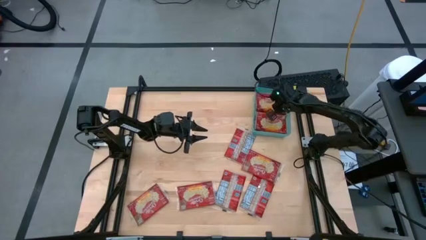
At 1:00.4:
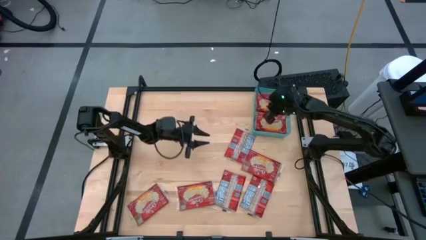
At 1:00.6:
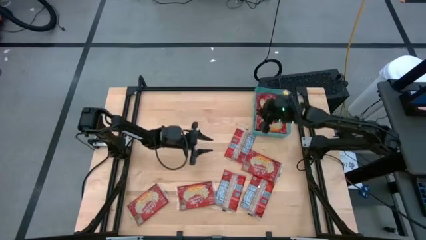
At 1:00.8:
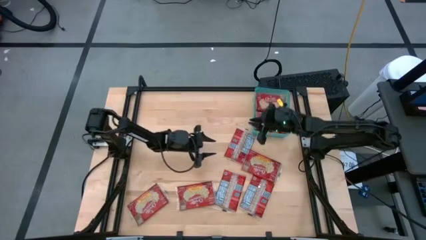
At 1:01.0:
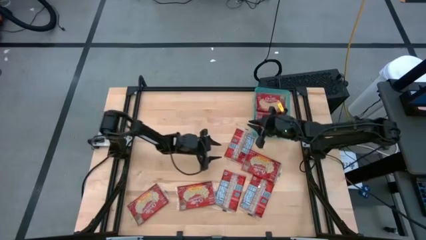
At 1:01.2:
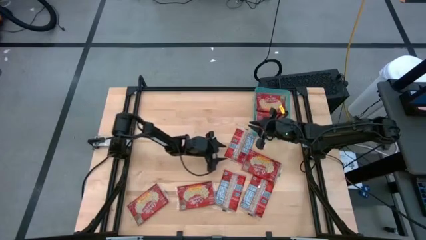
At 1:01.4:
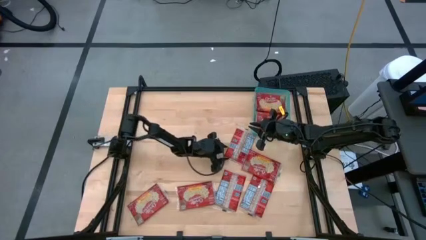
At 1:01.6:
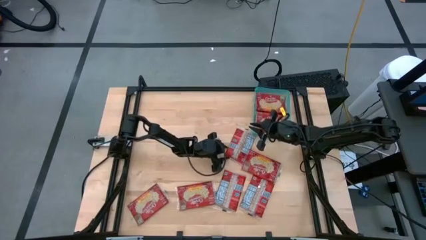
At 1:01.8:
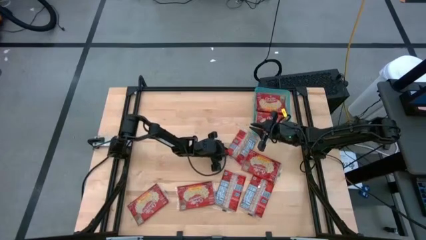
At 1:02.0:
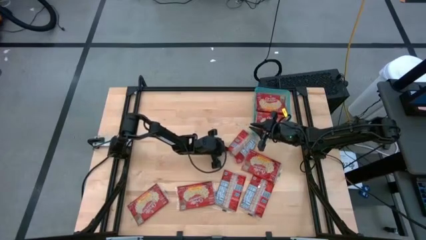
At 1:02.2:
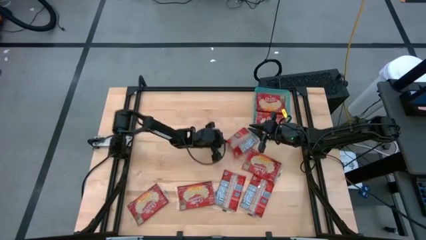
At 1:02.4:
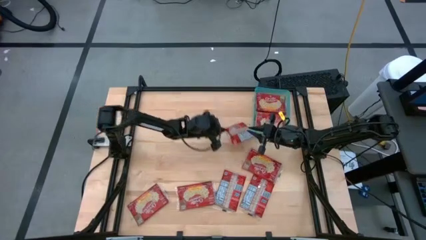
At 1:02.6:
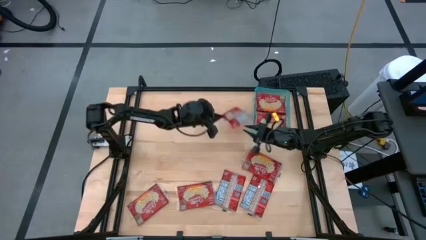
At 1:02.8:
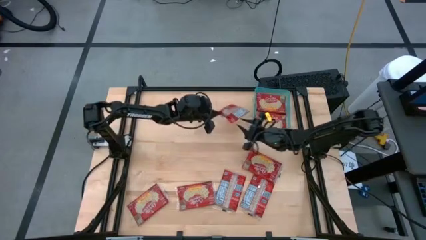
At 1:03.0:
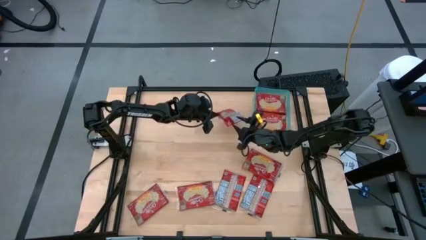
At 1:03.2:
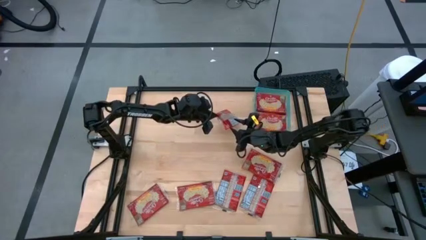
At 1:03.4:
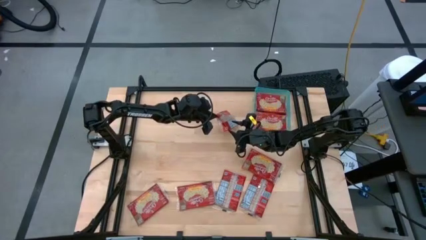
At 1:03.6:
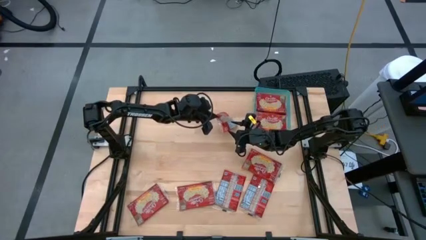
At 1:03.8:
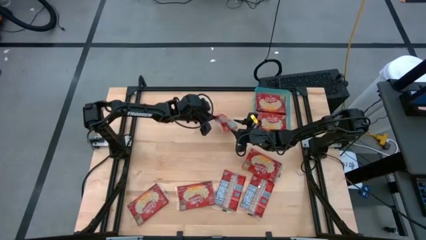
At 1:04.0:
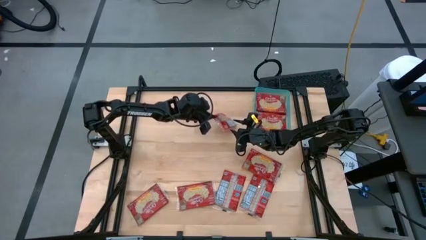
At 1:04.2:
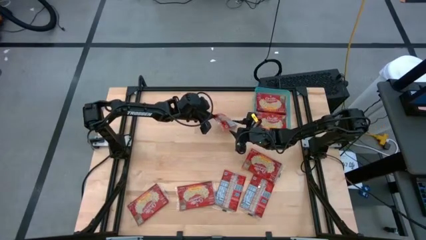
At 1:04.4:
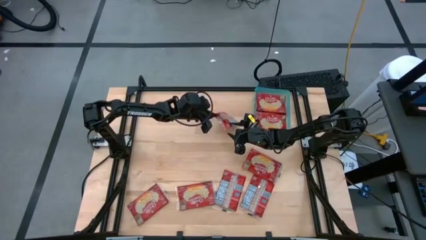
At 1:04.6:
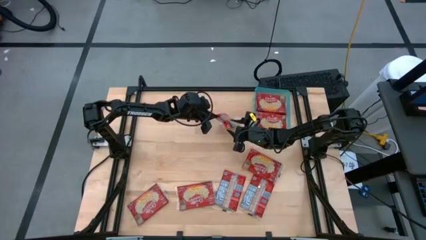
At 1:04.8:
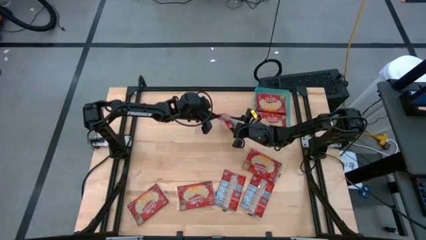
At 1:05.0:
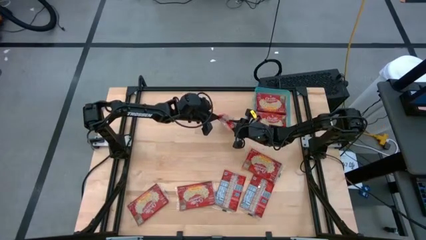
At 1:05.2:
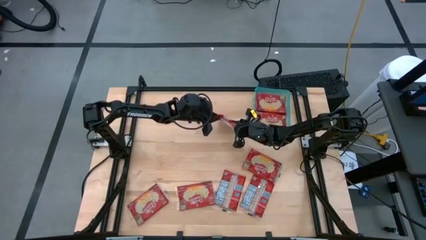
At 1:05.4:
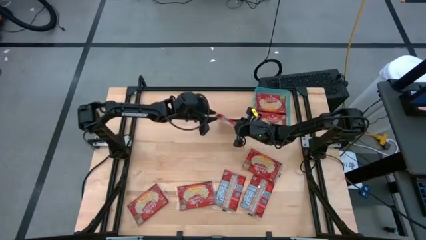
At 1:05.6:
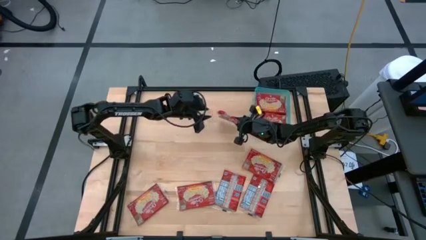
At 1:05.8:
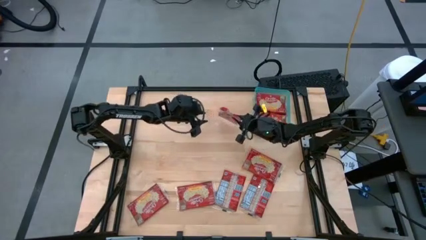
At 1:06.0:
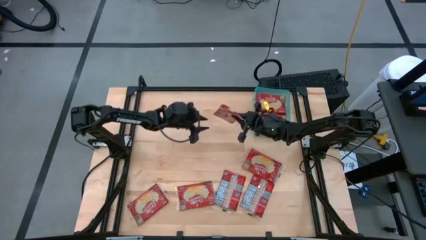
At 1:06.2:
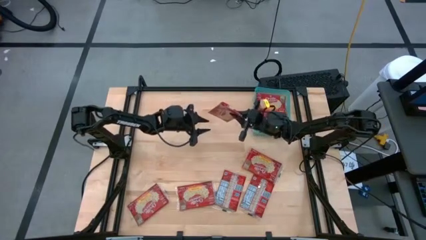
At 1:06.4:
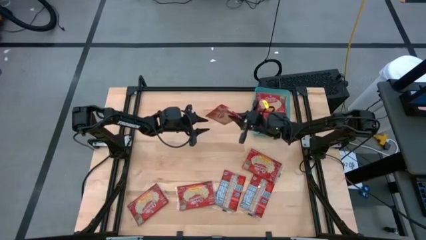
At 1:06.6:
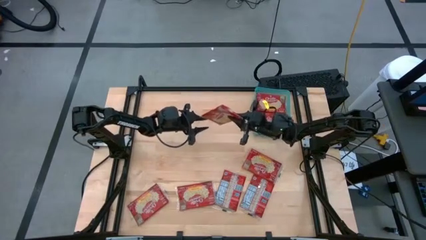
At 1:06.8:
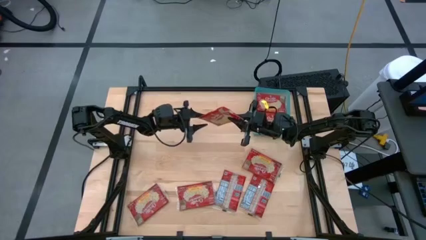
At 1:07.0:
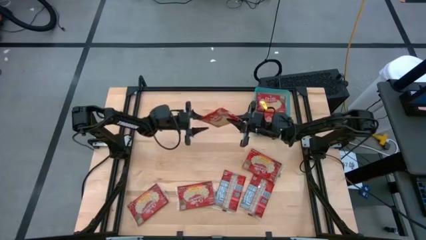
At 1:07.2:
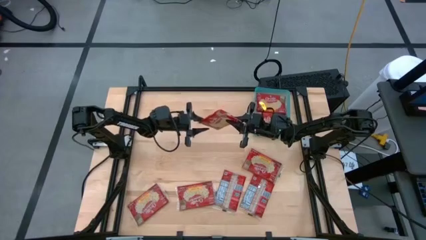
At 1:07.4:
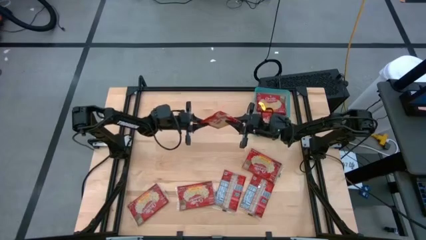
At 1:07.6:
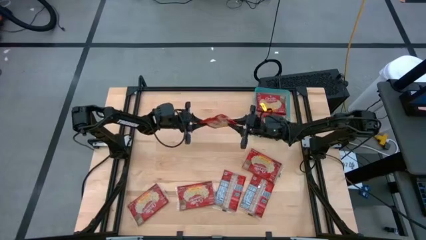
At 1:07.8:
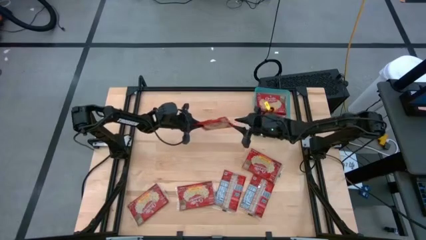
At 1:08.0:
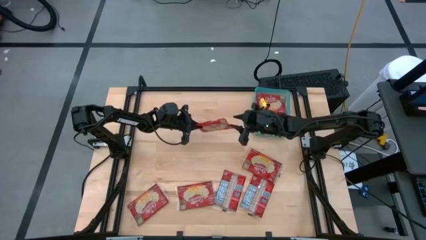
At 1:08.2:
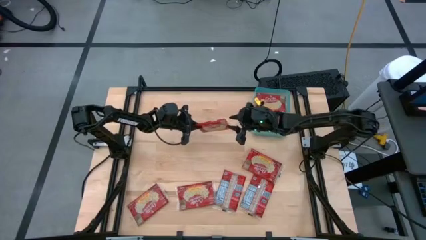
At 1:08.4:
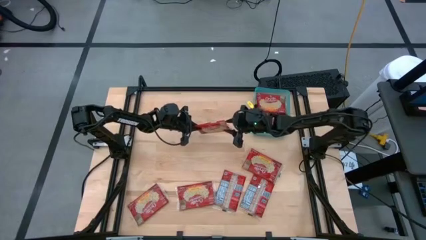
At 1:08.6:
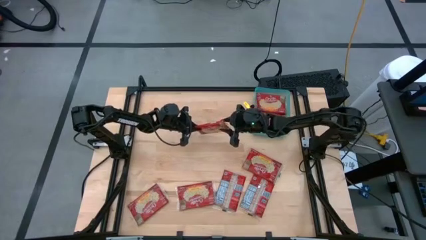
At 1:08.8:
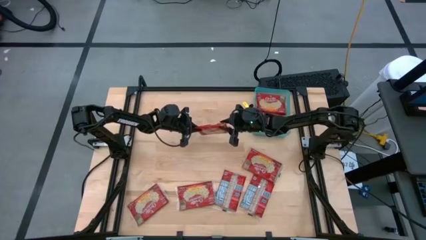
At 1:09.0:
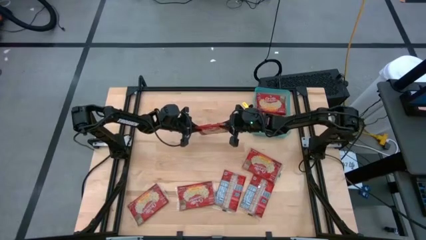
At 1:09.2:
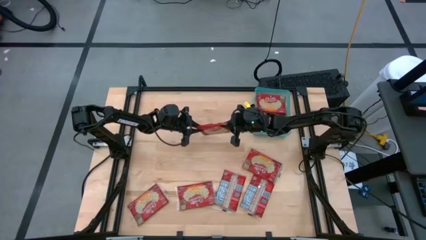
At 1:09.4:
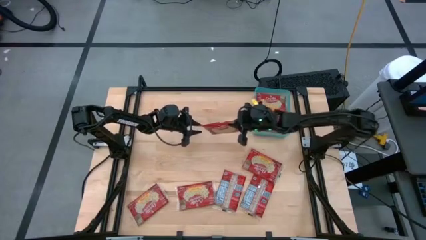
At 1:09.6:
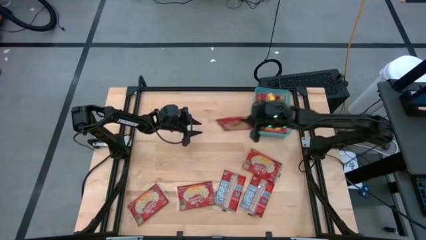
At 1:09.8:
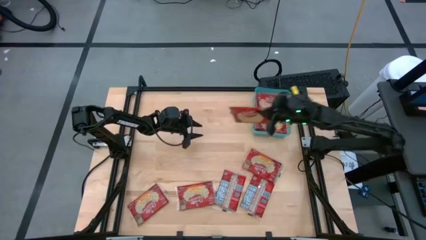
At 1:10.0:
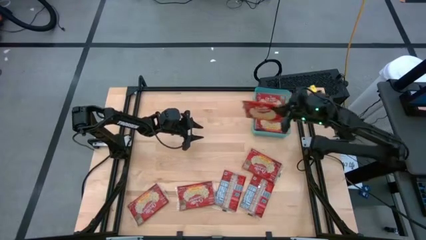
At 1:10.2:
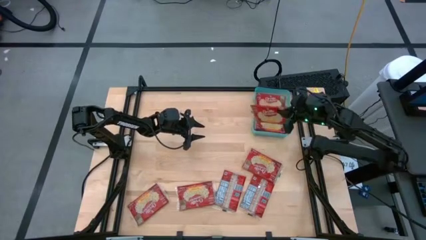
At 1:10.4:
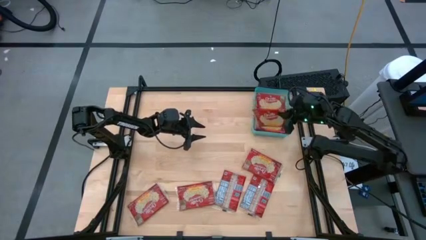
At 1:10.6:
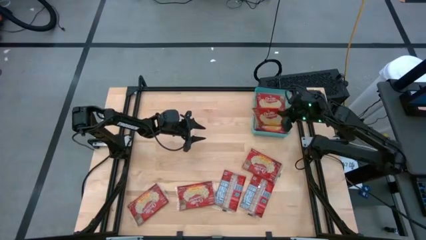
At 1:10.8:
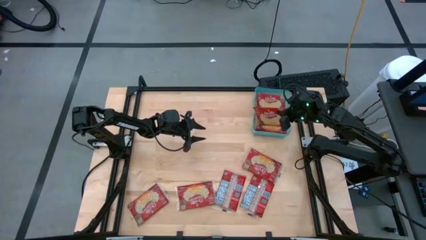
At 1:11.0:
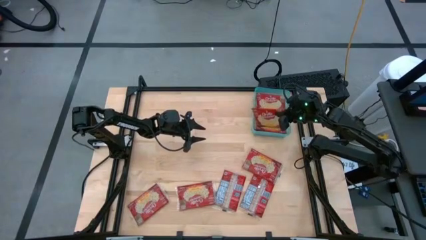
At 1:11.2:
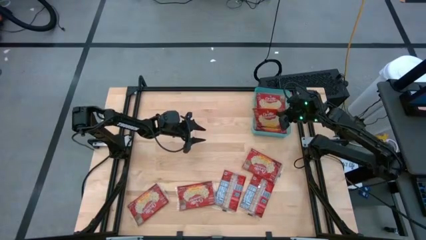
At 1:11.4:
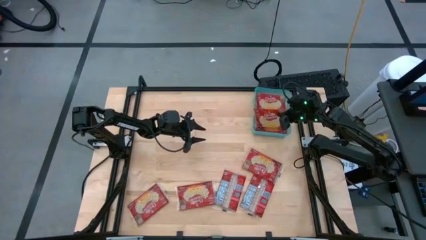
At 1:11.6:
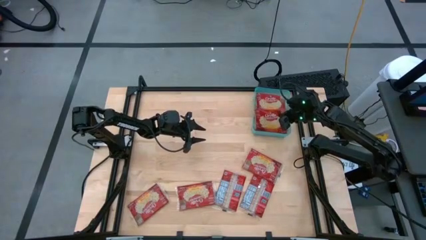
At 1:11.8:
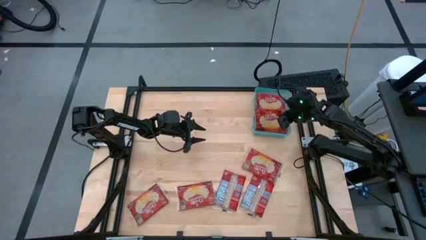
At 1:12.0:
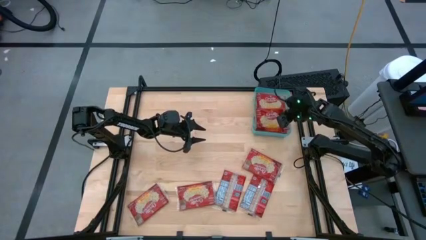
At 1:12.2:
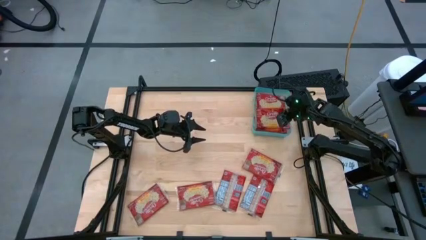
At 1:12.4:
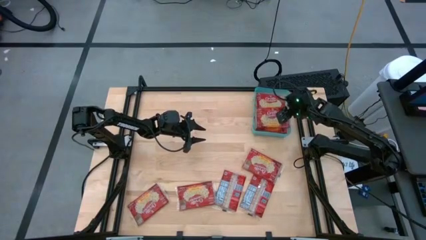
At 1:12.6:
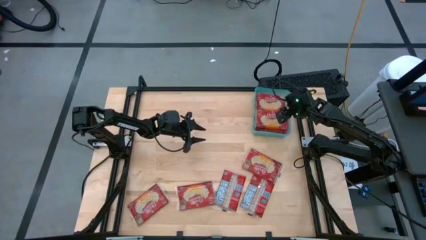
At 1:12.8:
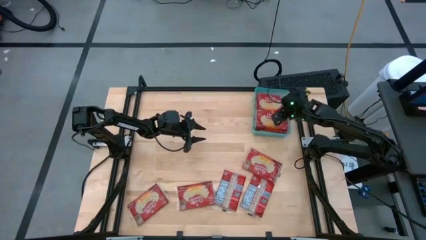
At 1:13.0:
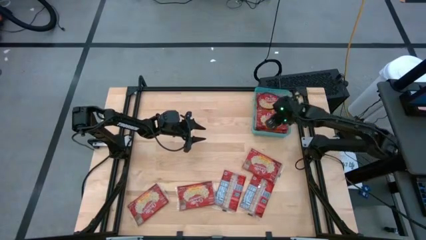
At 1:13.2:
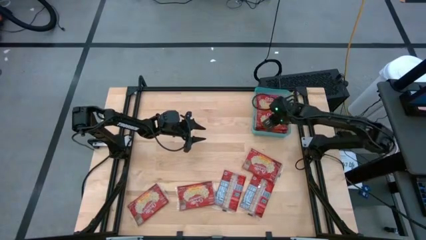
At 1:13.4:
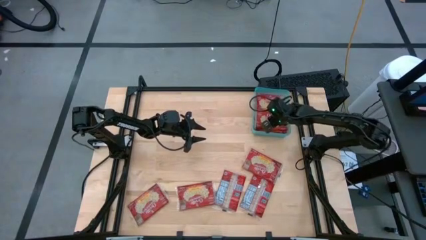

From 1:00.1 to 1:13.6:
Task: Sort popcorn bags into baskets
Put the red popcorn bag into the green bin

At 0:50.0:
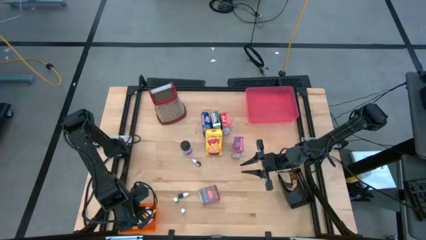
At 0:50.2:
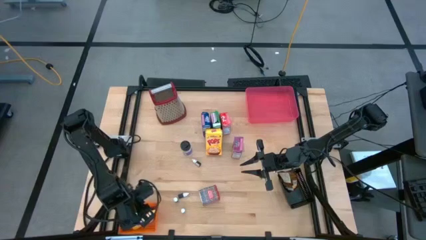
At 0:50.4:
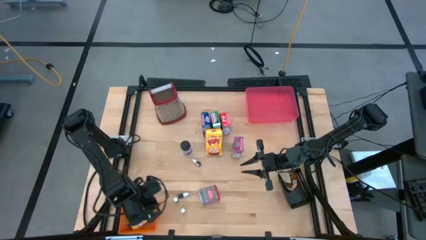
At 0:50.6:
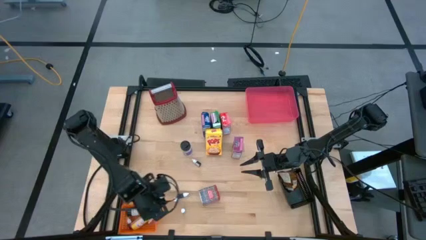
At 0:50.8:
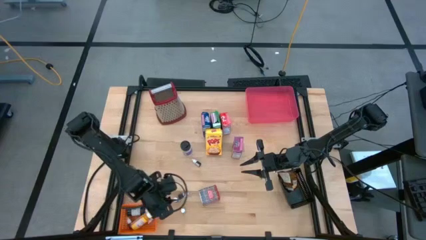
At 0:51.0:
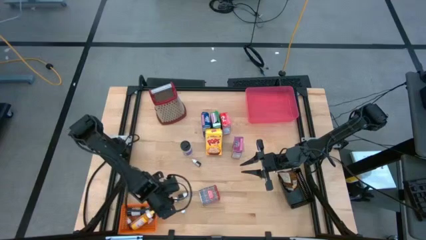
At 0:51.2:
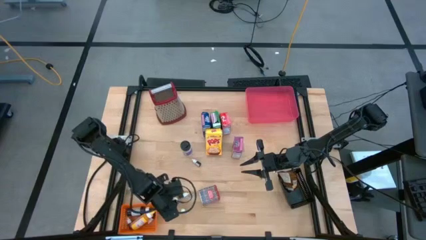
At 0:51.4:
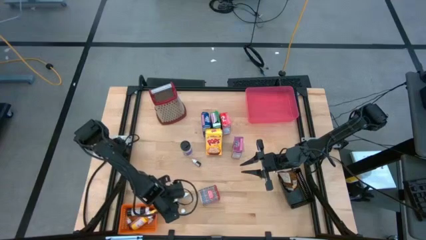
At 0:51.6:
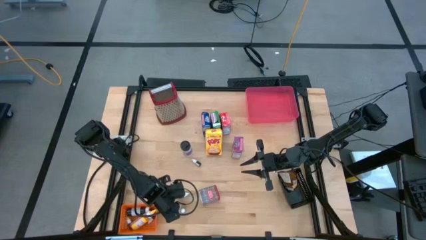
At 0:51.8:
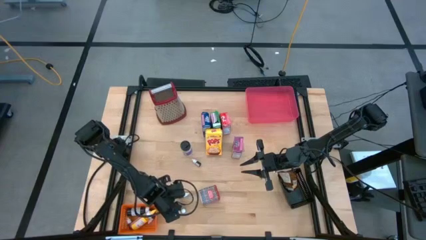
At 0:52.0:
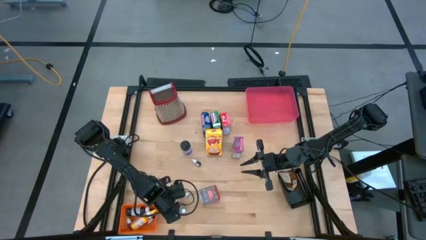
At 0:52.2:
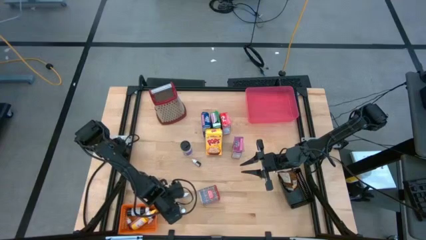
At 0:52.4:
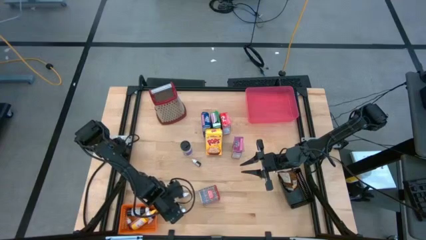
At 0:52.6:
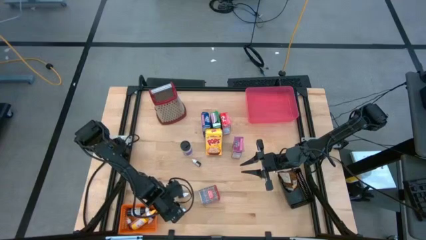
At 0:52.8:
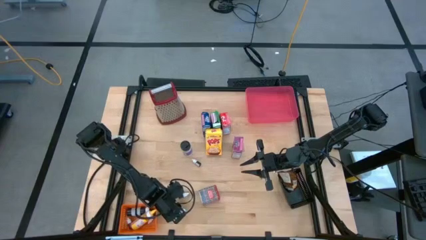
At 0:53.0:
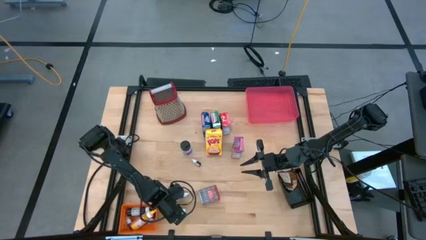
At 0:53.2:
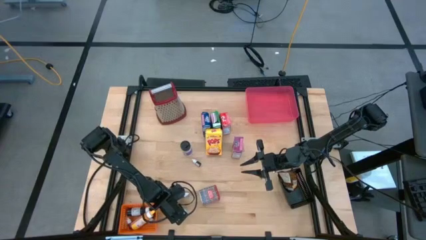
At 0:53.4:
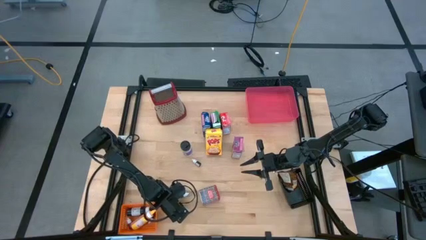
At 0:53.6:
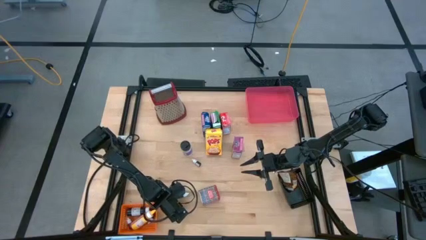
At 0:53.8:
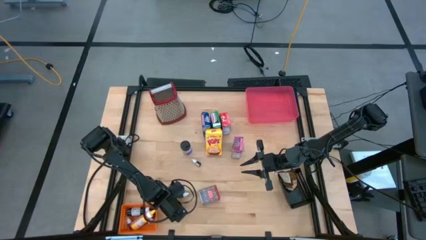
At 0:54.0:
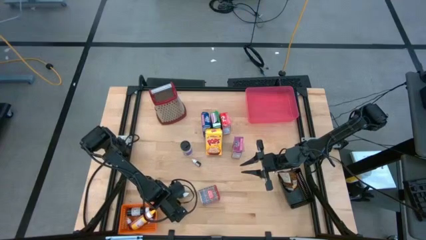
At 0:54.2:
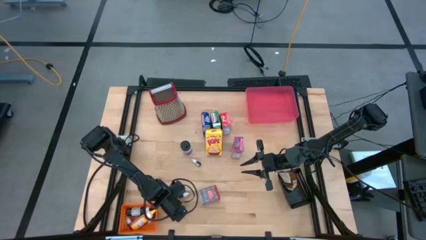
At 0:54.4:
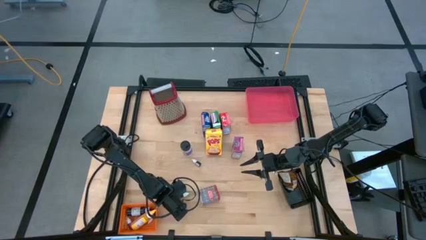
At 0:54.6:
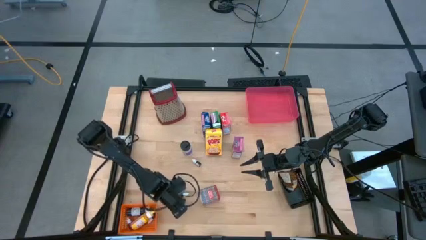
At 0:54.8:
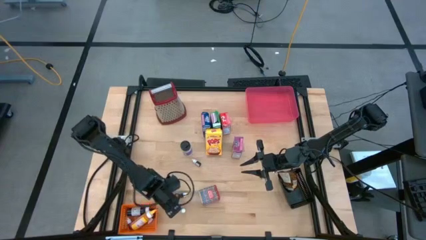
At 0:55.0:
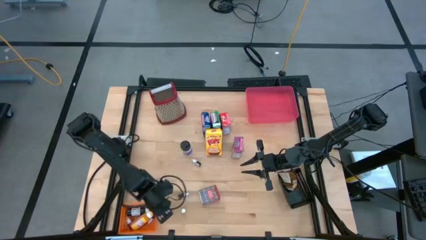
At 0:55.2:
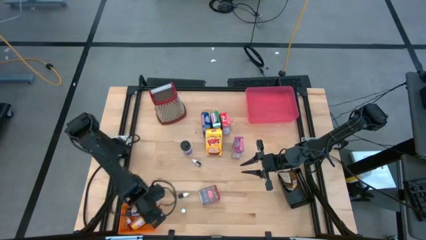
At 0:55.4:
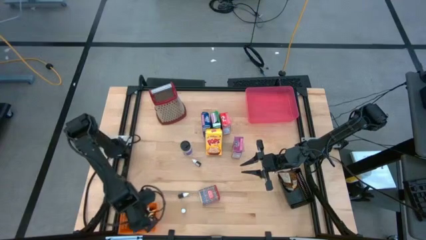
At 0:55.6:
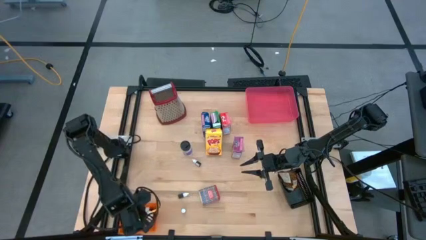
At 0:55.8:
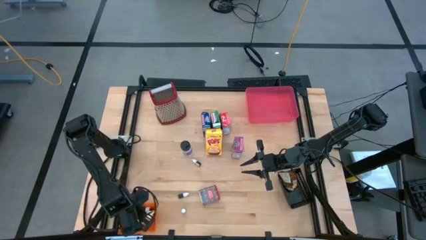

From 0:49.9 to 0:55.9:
Task: Pick & Place Kitchen Items
Put the small black food coloring bottle into the orange bin
